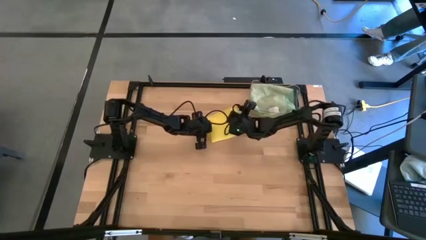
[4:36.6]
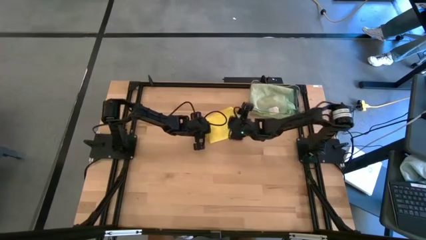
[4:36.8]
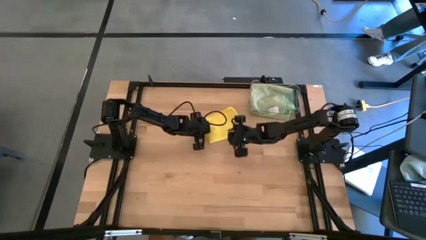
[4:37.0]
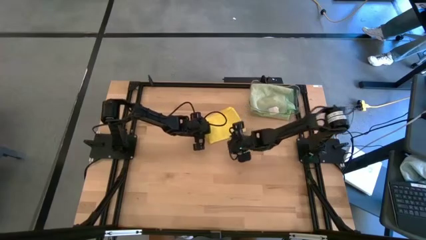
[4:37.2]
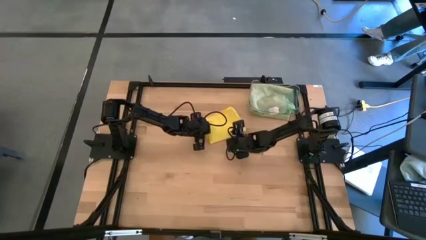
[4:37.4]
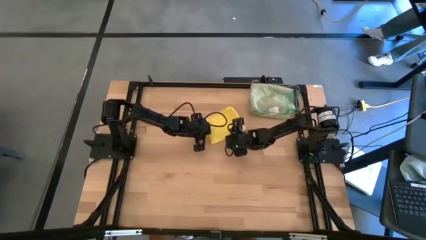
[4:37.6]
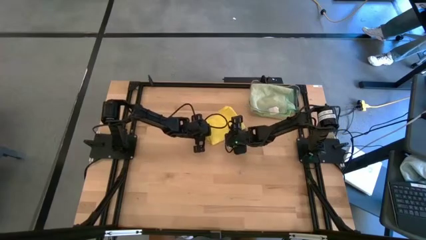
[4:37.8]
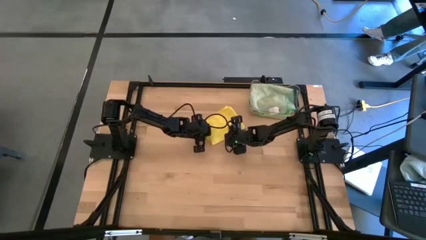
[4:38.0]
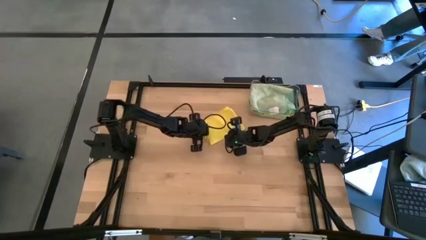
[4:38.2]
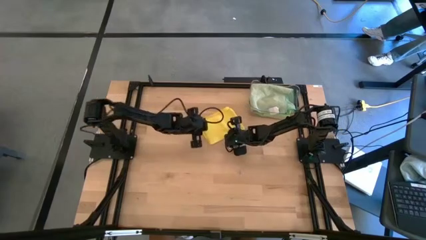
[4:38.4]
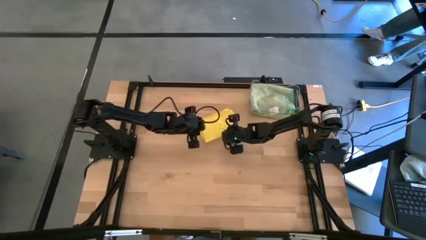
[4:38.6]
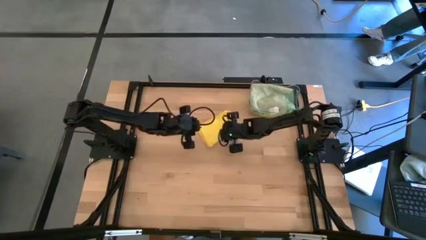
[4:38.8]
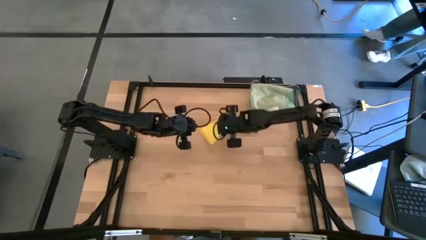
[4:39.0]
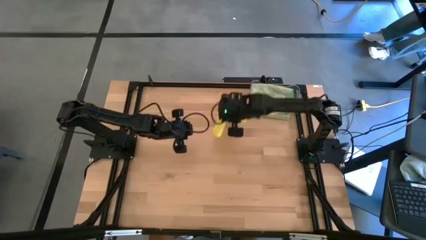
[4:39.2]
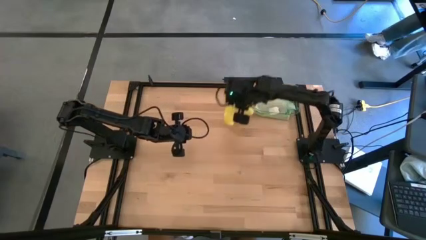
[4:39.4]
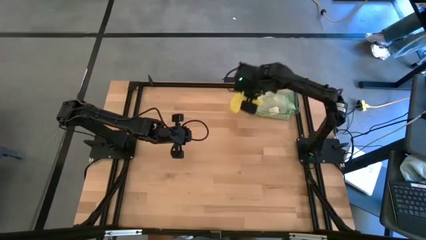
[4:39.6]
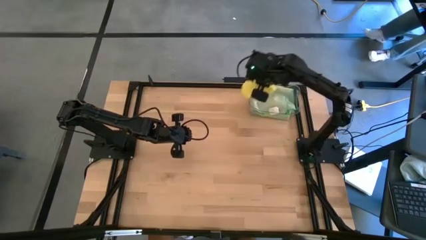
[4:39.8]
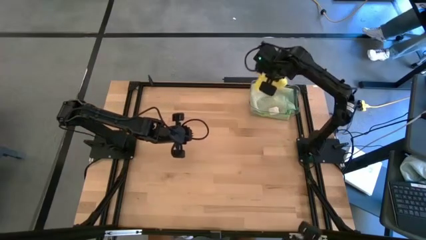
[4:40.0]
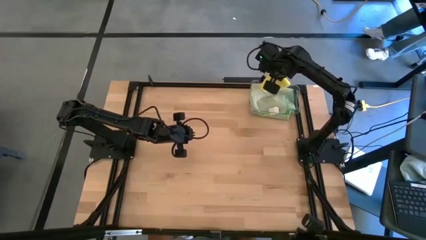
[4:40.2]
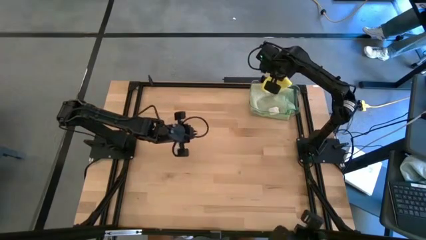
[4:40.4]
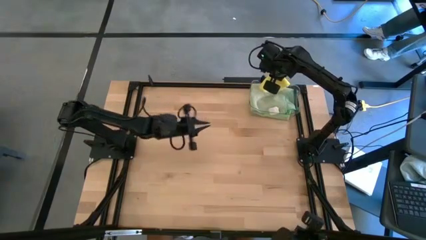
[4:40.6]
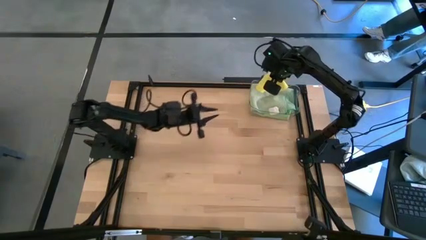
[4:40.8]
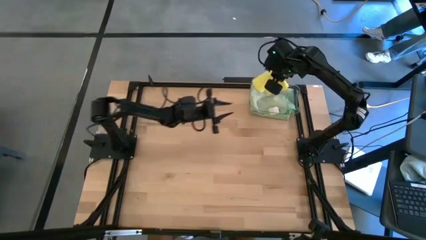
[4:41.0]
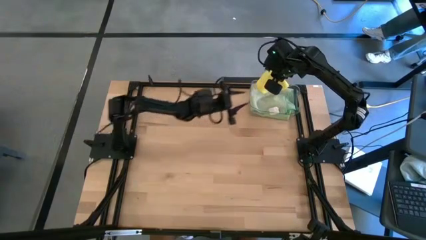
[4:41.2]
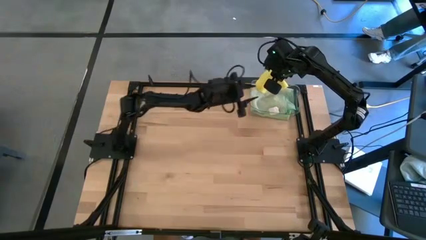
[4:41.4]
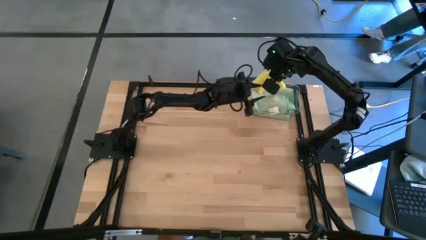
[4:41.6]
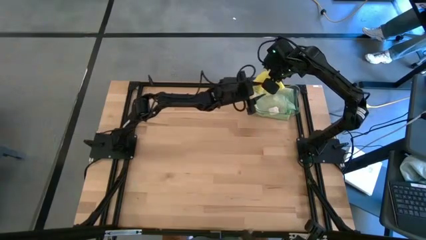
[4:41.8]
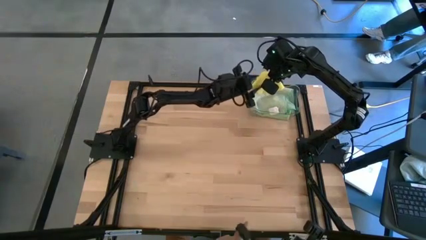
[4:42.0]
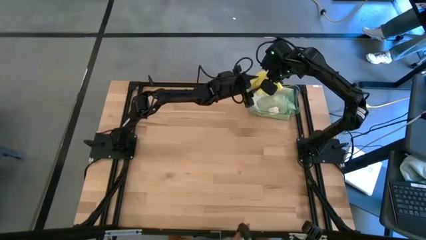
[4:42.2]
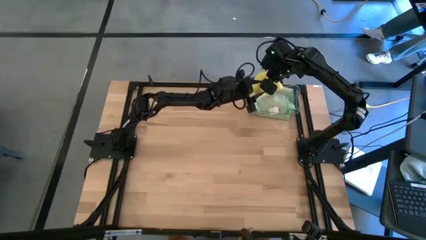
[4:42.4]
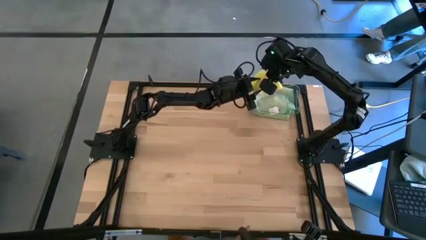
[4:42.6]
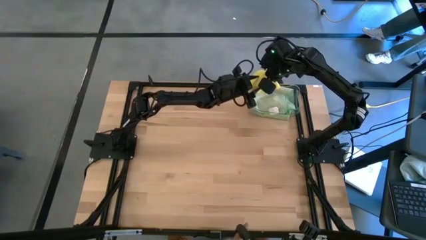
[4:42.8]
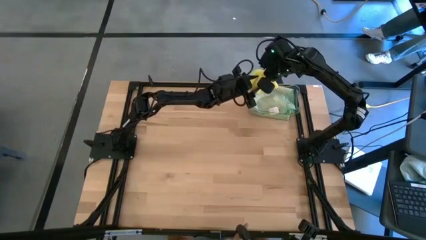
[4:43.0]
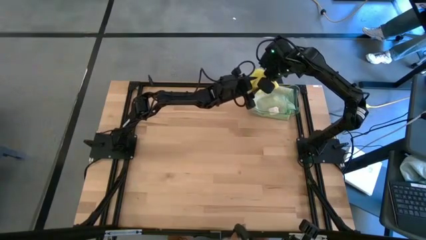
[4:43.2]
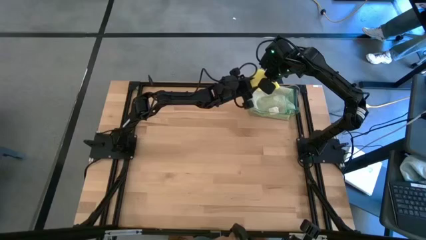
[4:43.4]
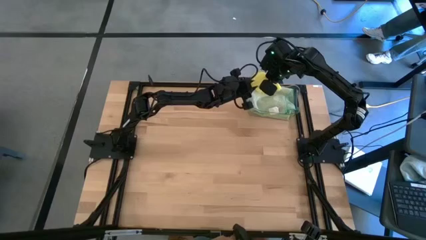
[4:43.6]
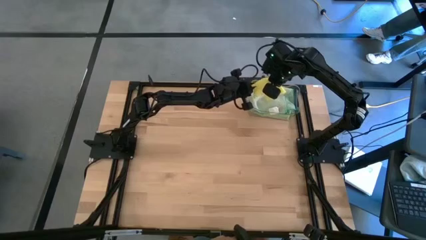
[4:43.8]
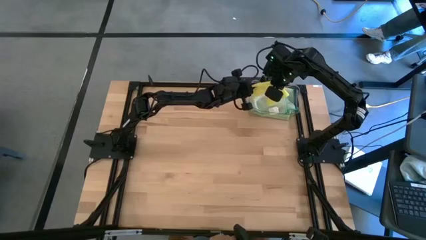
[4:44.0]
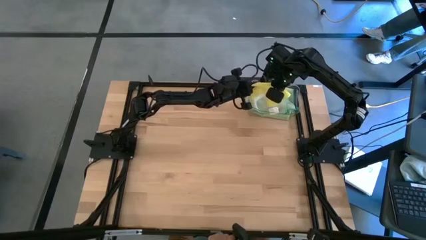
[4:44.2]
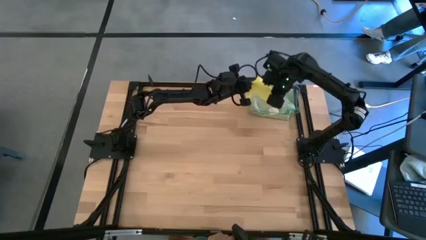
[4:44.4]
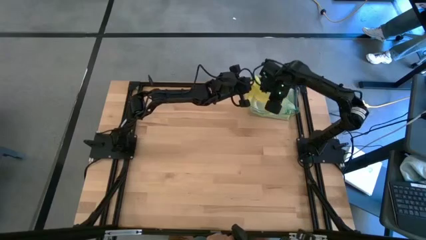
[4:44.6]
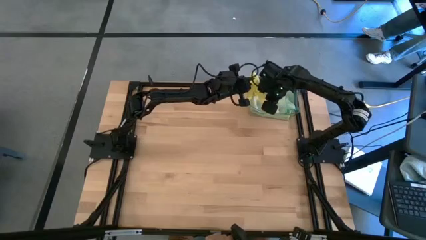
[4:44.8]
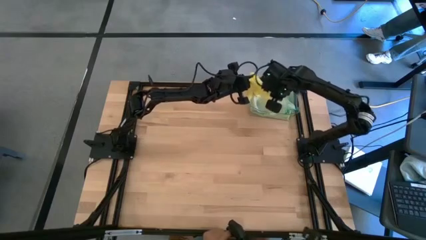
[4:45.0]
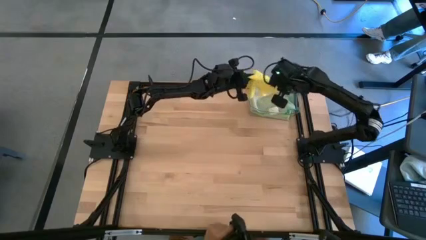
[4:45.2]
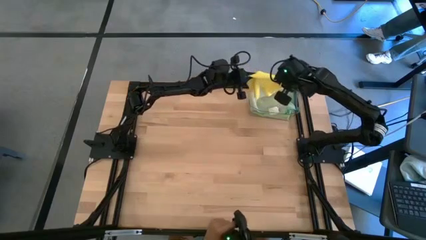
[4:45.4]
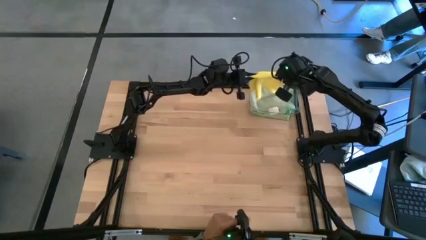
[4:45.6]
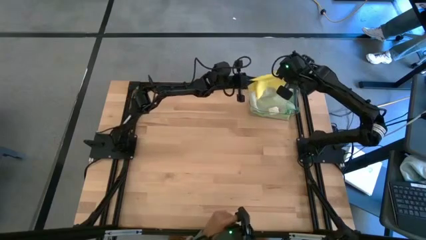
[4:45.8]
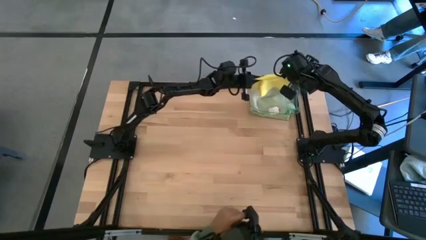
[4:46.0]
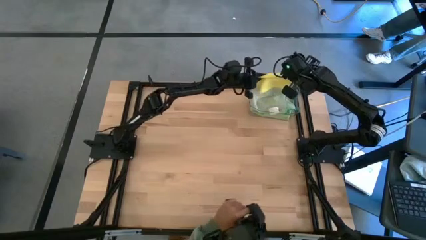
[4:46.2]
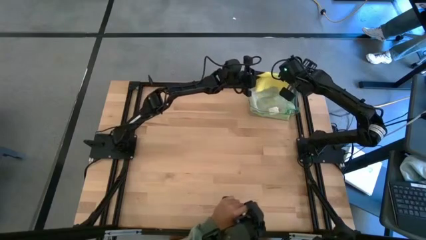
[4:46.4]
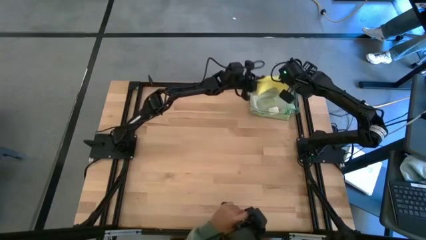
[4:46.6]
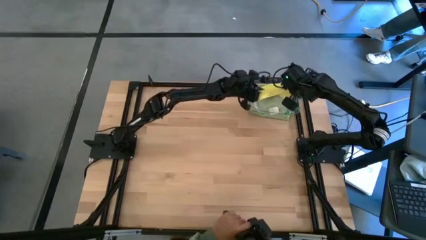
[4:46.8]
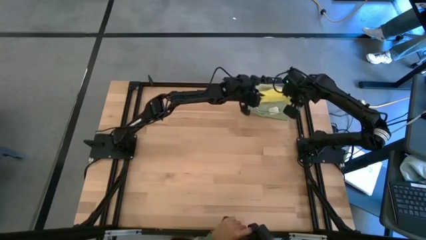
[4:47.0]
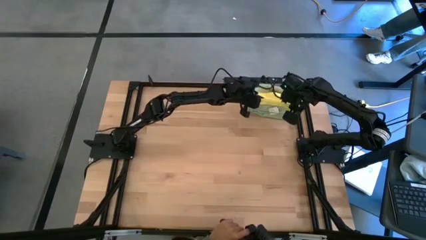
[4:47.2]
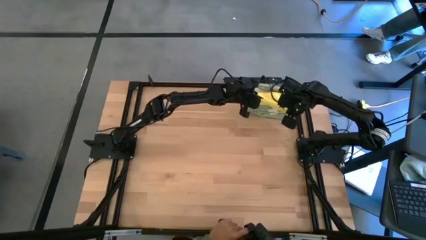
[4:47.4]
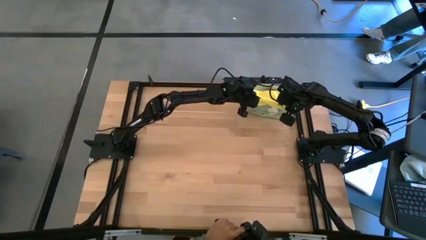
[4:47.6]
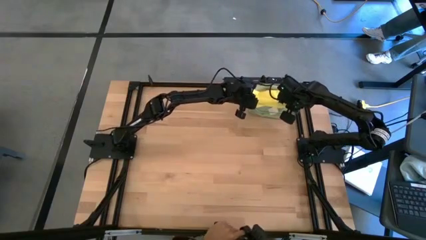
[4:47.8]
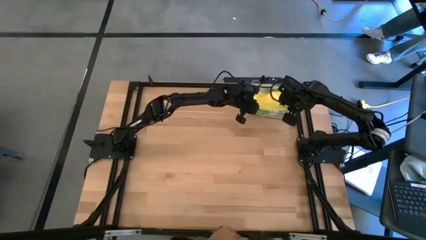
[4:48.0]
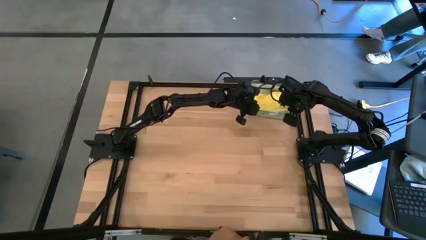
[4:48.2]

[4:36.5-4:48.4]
Task: Fold microfiber towels
Put the yellow cloth into the transparent bin

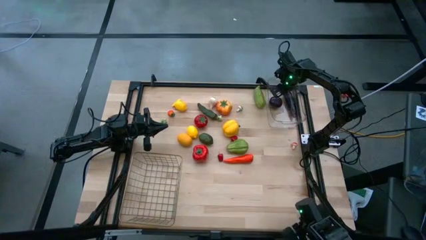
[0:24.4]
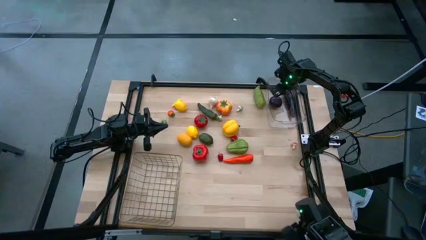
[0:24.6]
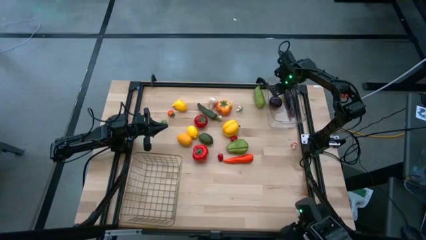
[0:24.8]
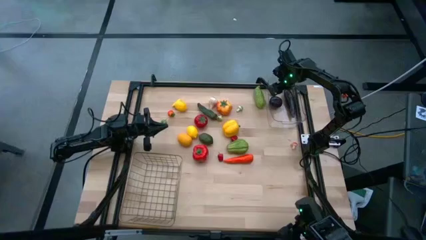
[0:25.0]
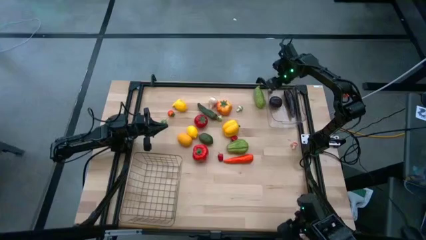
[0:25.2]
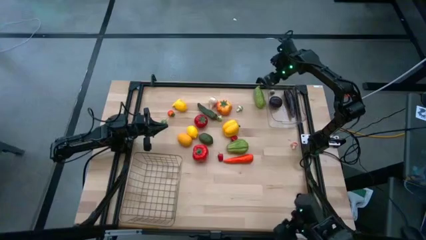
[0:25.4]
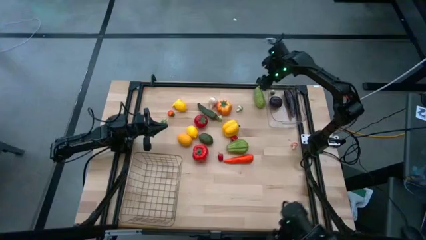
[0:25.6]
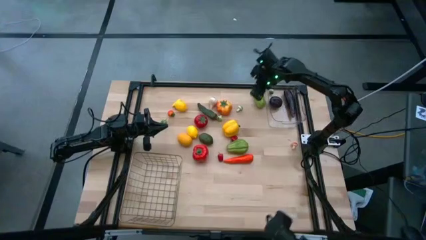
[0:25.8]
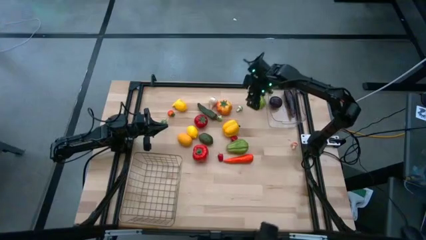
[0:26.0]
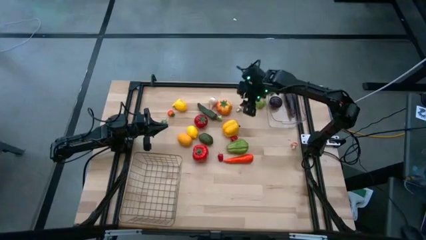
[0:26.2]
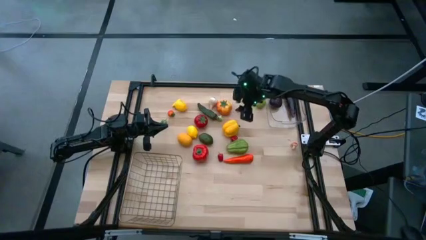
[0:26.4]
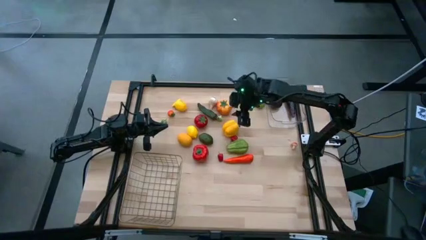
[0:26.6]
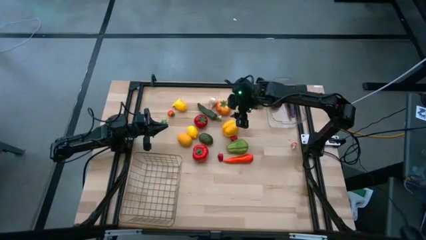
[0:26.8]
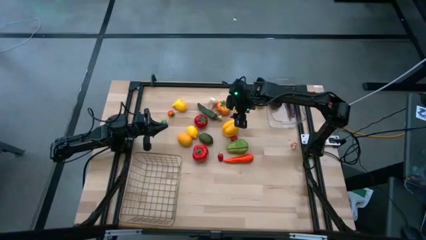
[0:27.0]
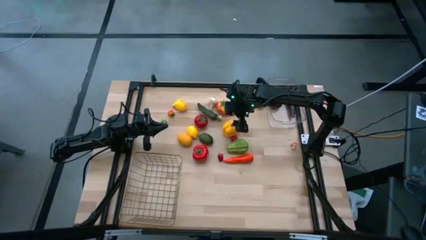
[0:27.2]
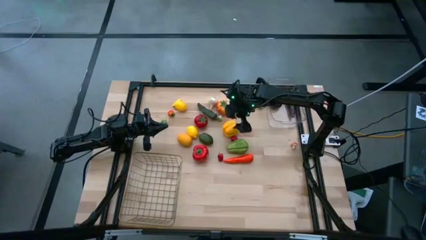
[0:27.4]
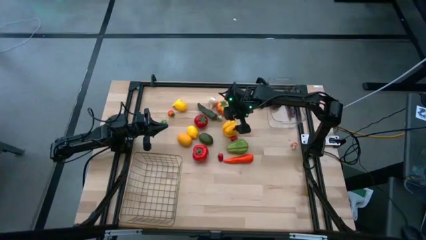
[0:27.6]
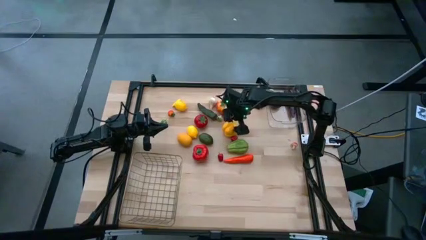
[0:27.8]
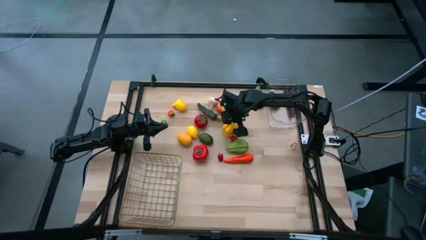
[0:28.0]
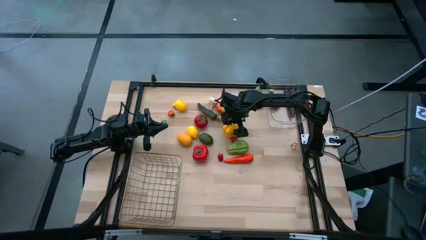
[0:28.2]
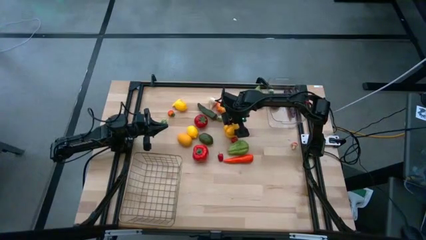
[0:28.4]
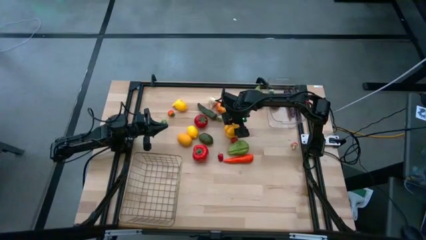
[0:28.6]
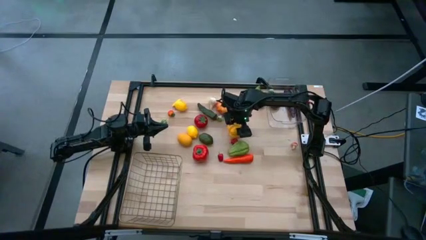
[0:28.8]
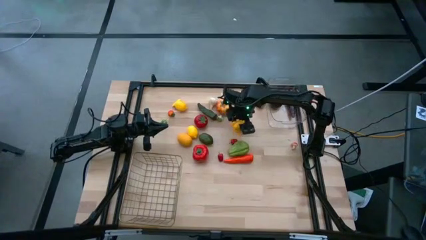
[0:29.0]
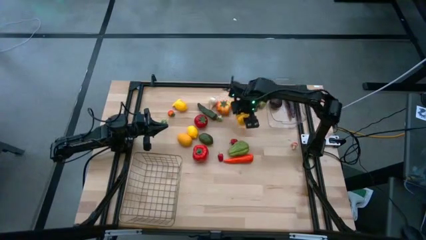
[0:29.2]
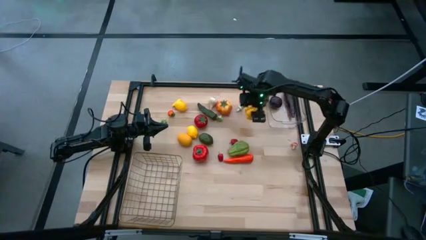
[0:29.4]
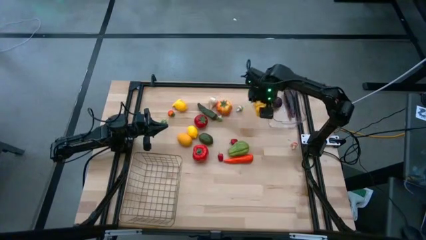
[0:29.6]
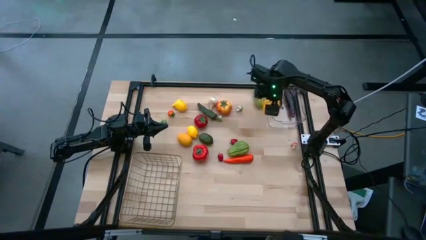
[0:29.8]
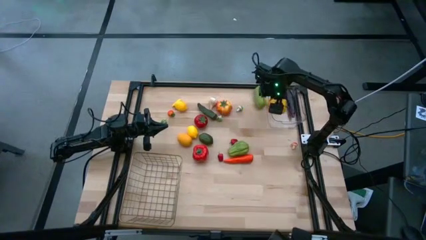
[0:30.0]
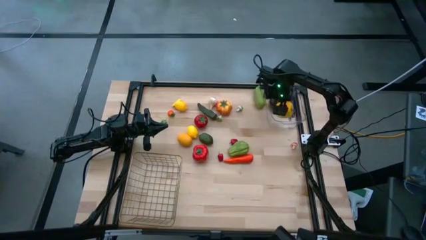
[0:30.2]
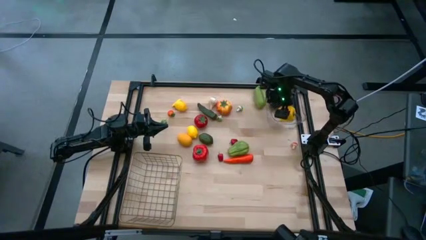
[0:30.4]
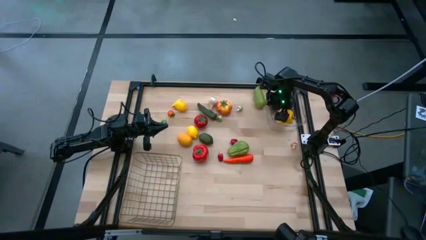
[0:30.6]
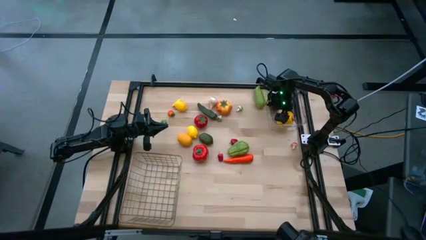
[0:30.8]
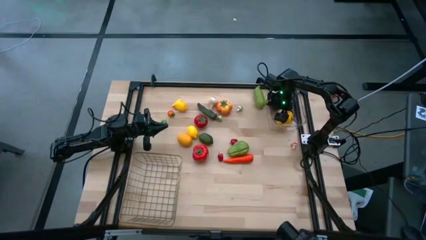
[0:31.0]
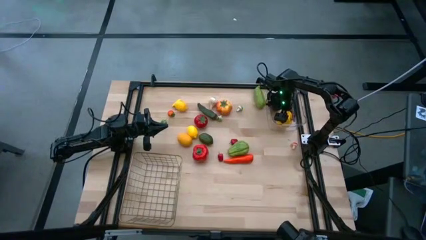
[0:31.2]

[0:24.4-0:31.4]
Task: Sort produce into baskets
Put the yellow bell pepper into the transparent bin
